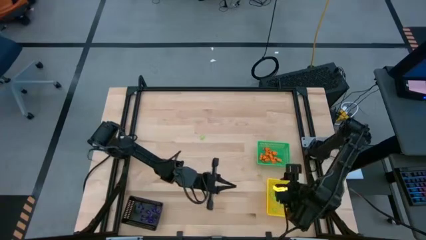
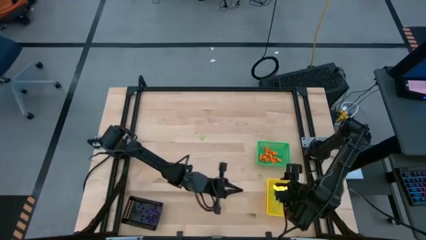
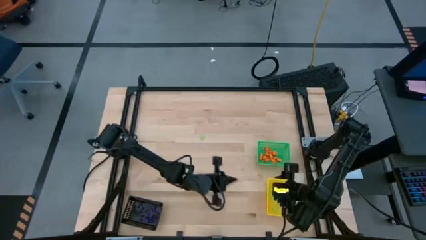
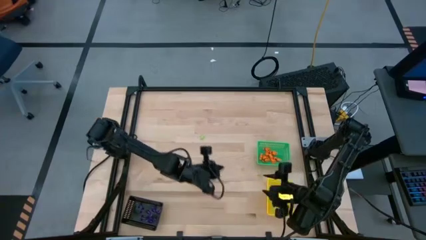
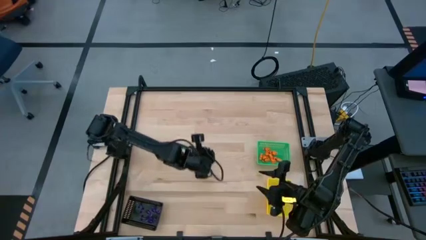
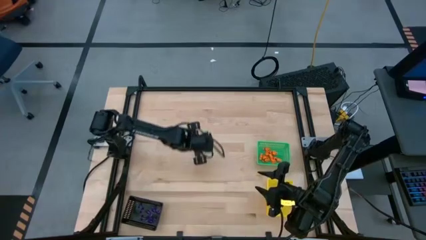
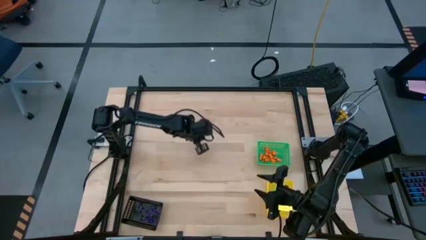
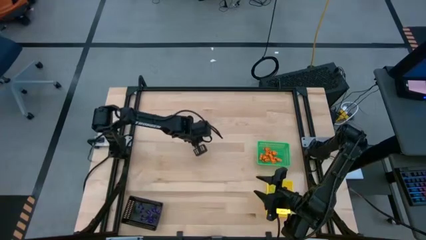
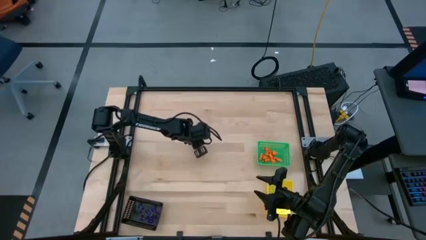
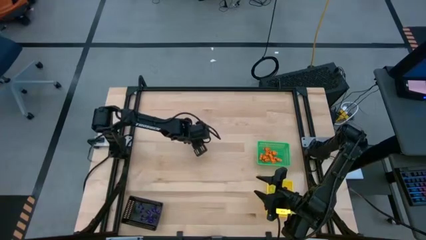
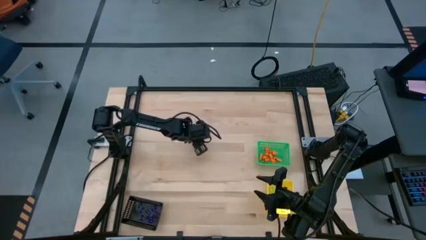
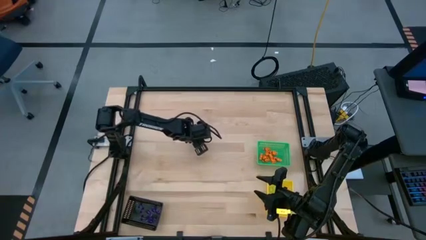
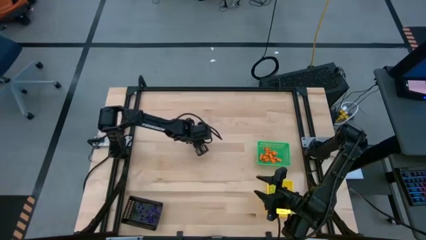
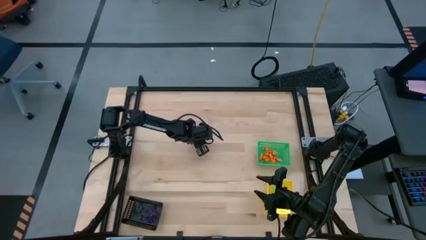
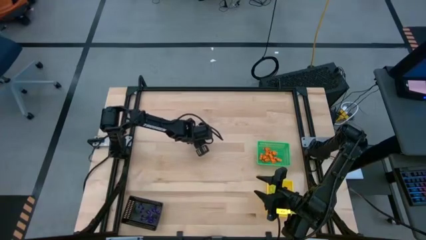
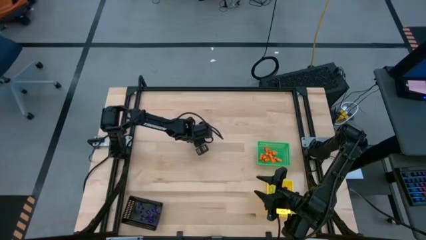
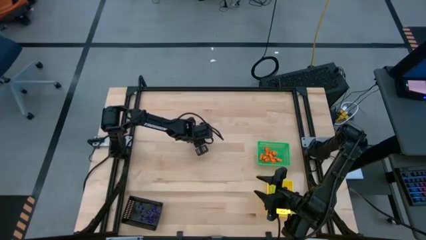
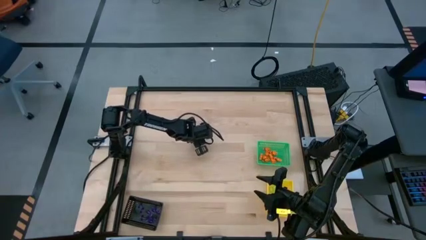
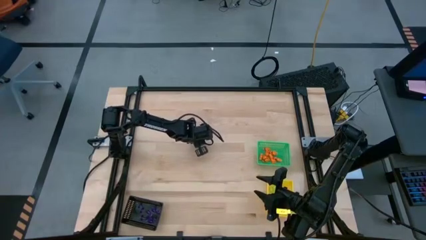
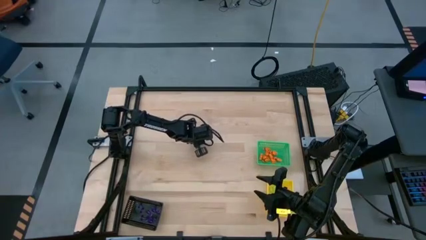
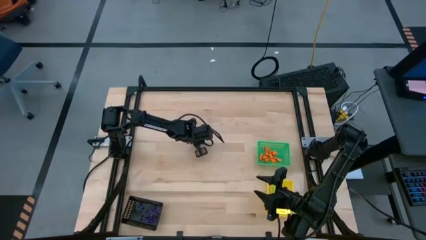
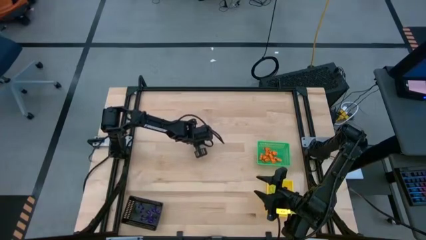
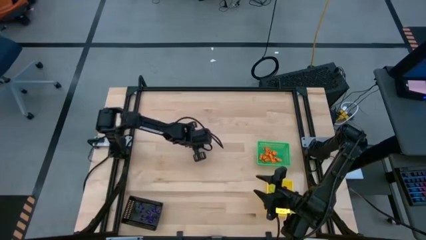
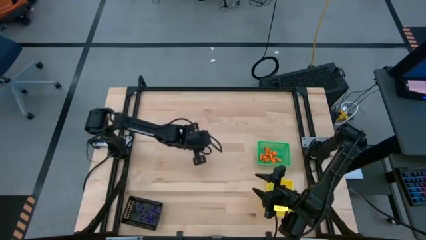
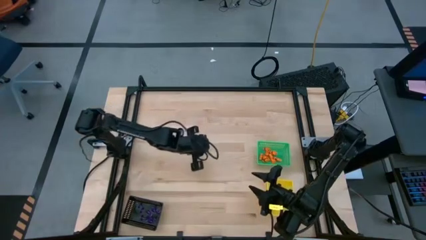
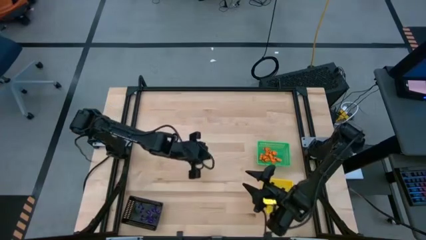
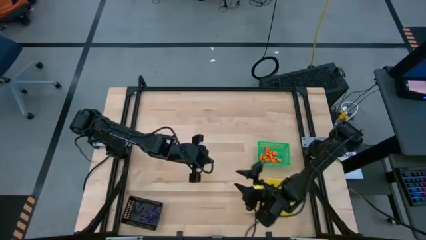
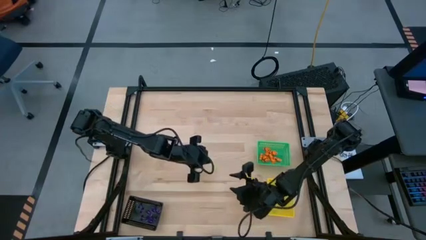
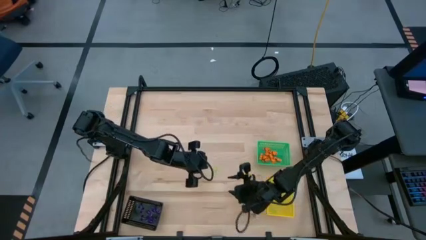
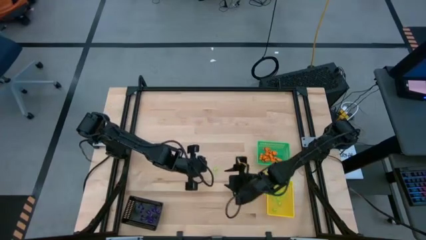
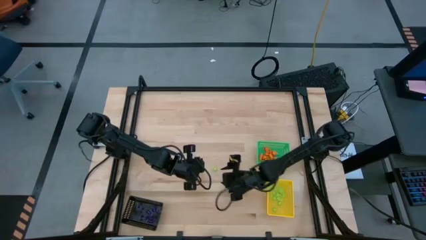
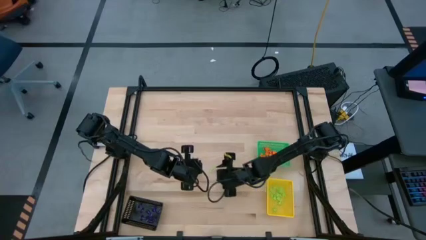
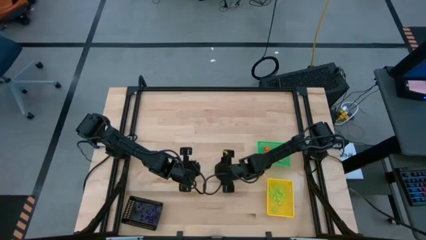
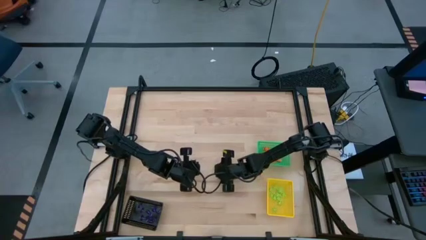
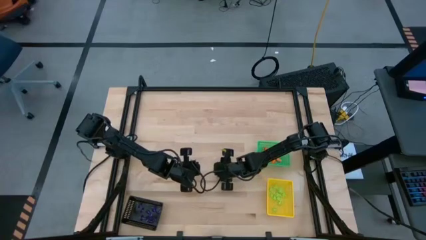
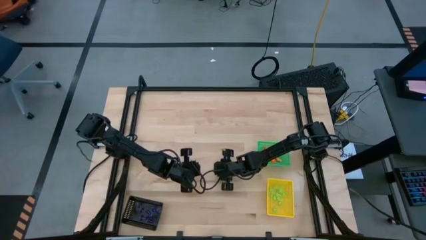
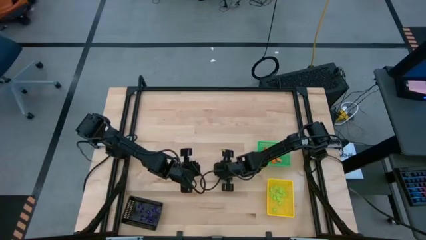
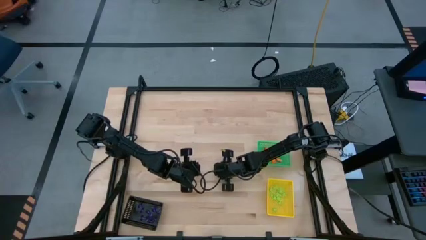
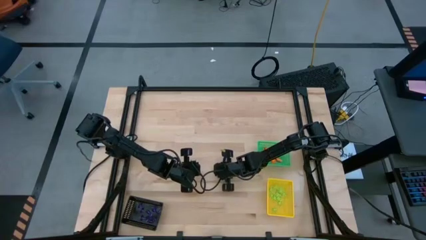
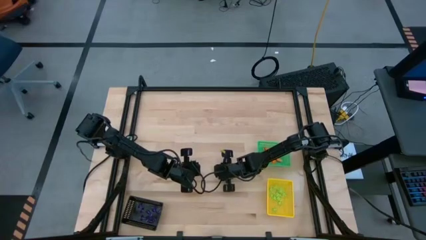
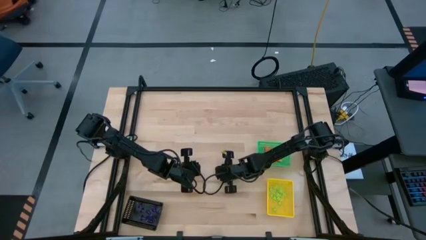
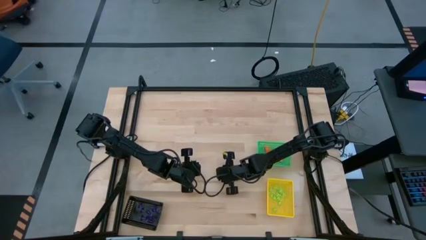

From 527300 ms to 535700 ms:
Task: Sort Halloween decoration
Put the green spider toy into the yellow bin

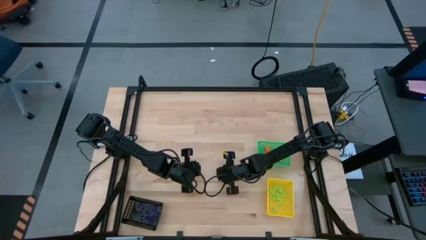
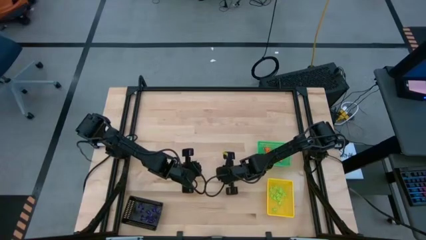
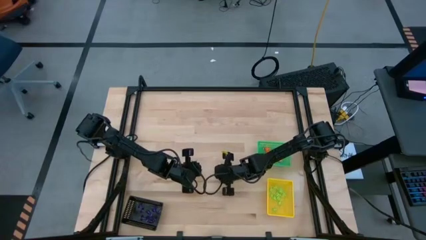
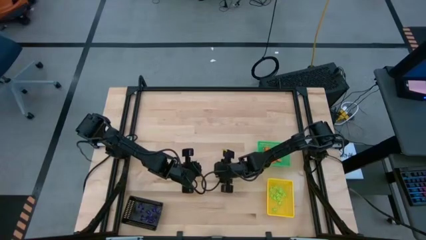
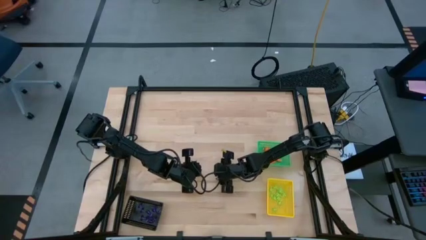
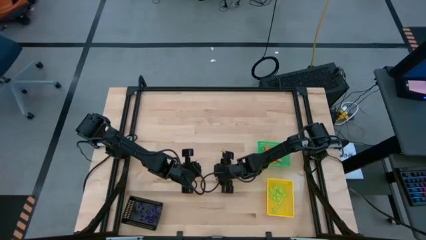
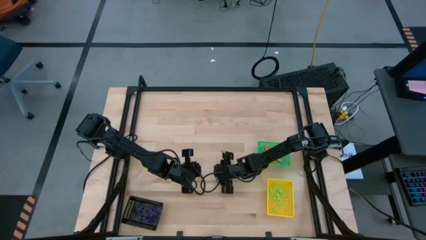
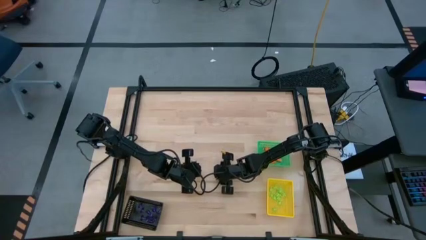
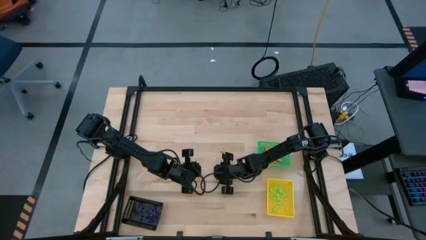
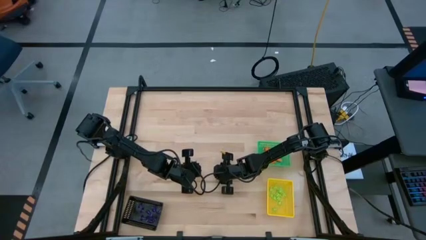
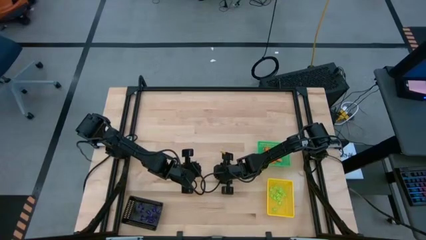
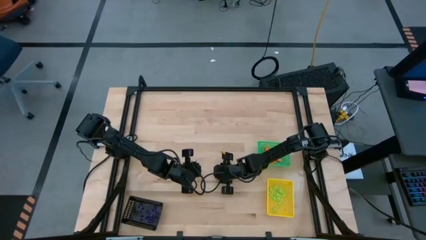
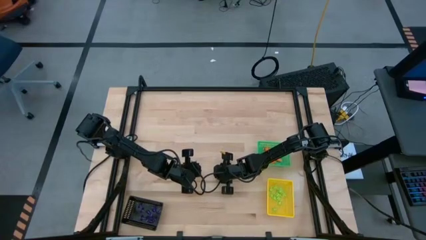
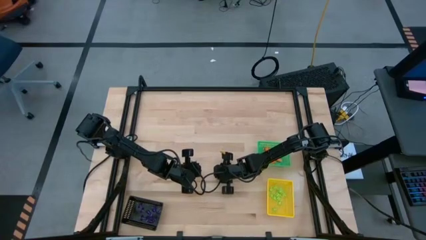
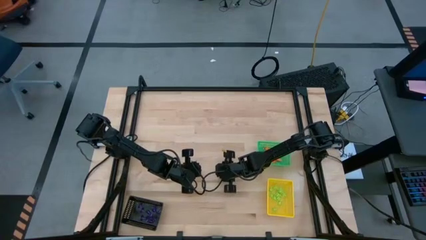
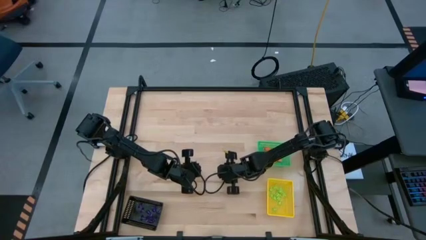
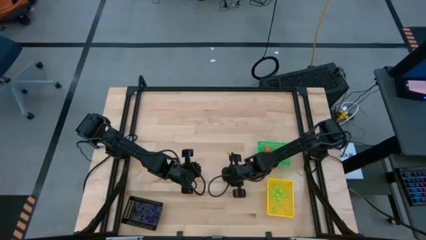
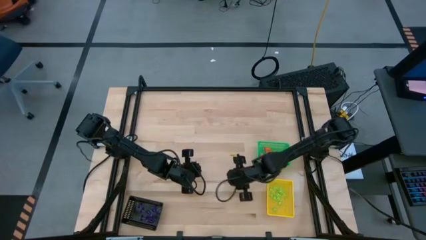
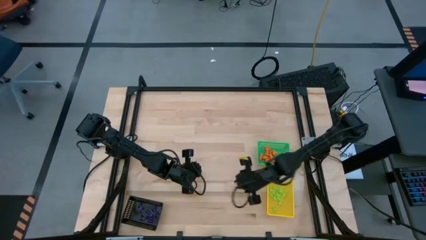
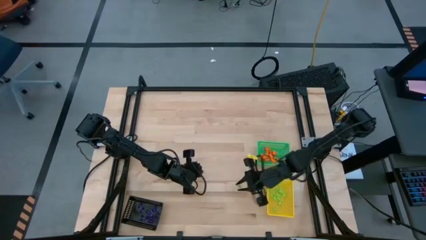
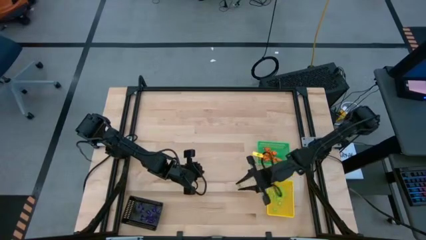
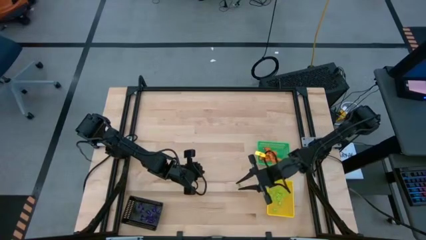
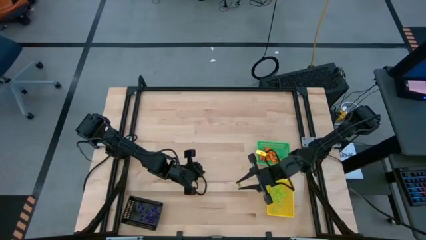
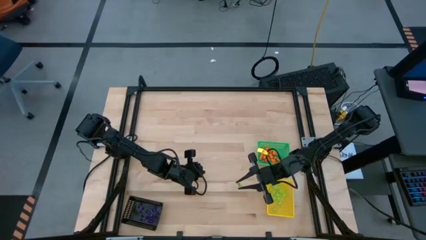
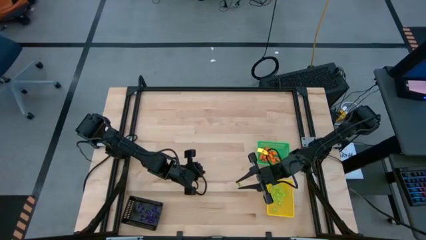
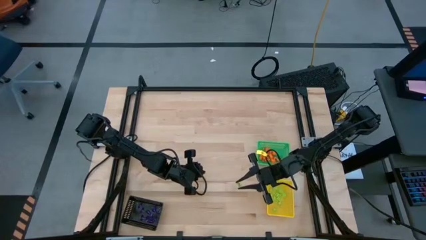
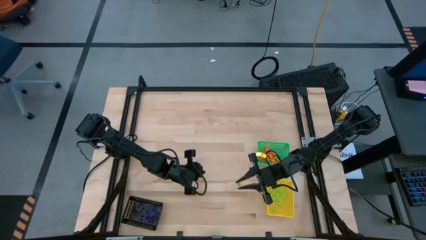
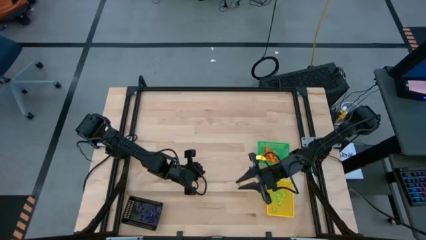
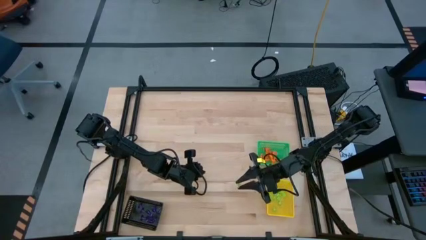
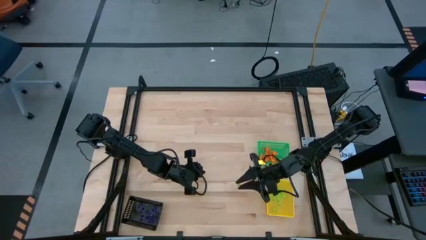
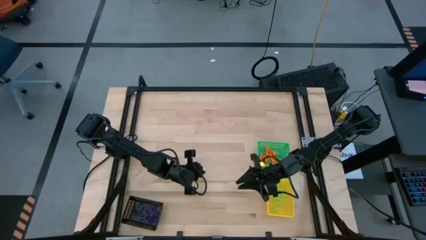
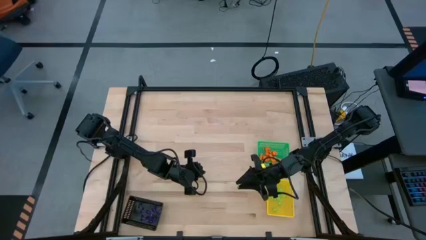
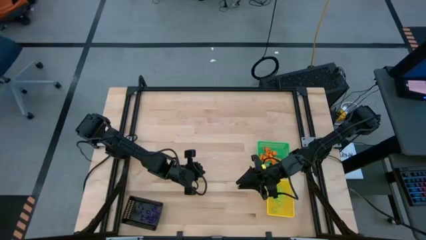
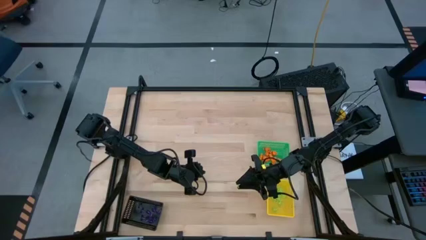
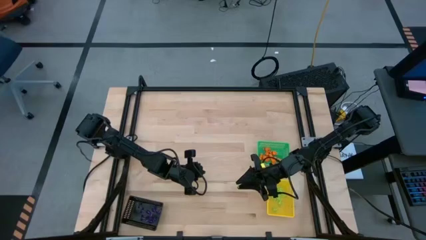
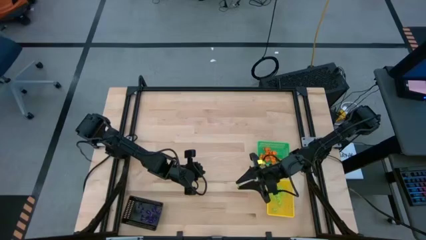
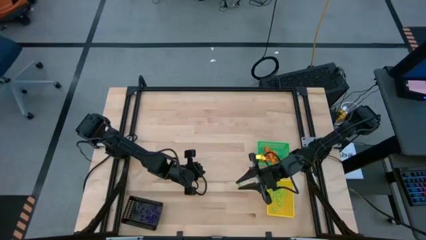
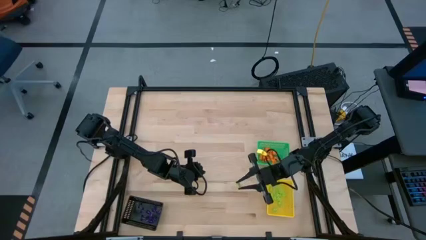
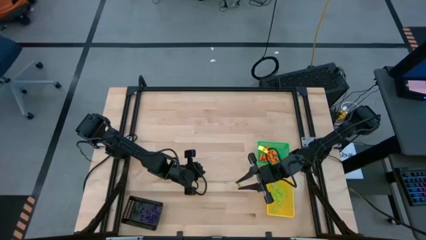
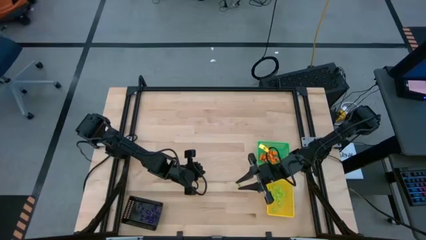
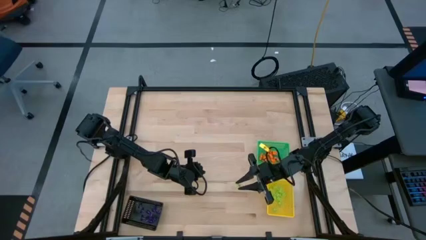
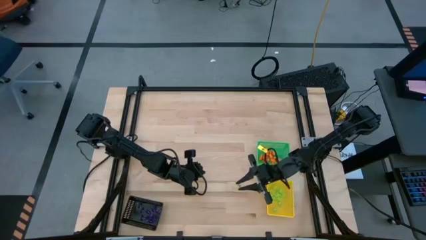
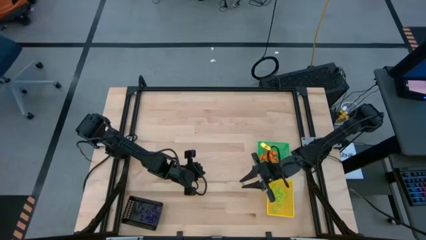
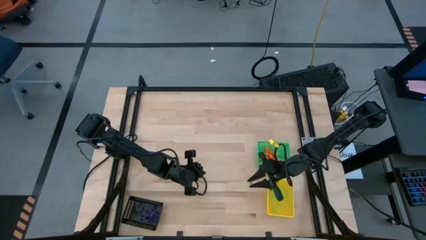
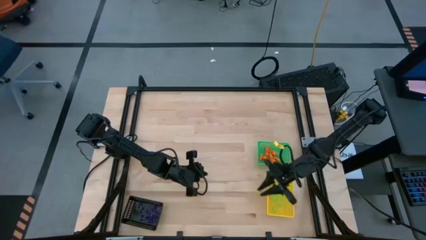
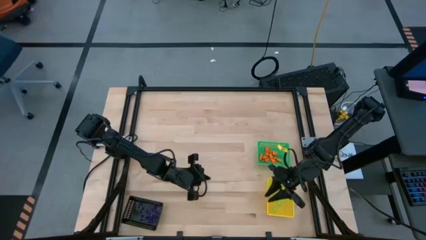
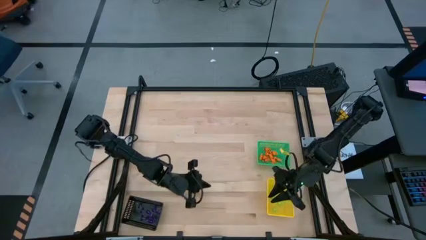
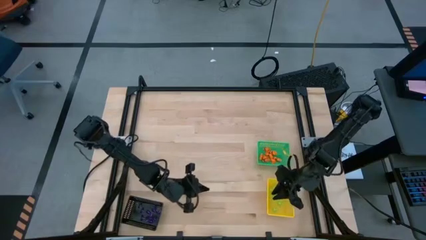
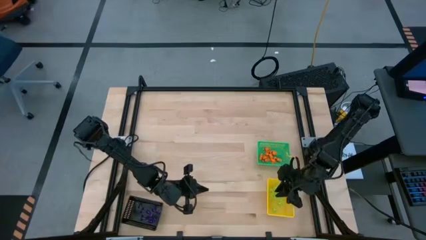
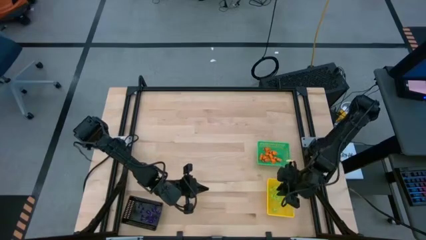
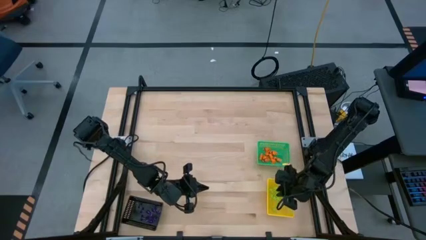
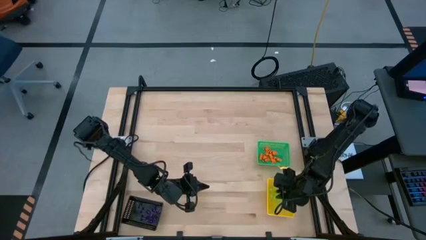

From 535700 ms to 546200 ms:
Put the green spider toy into the yellow bin
